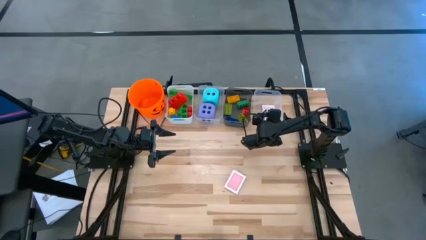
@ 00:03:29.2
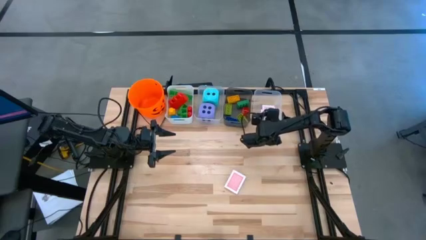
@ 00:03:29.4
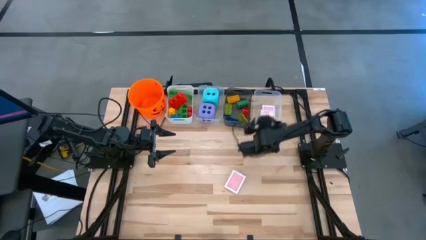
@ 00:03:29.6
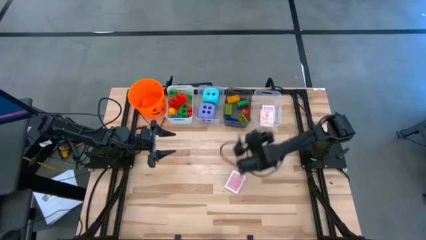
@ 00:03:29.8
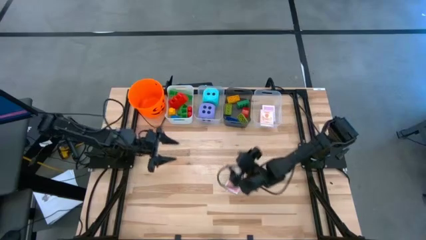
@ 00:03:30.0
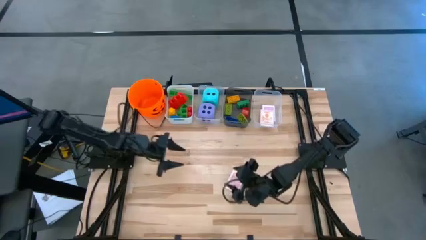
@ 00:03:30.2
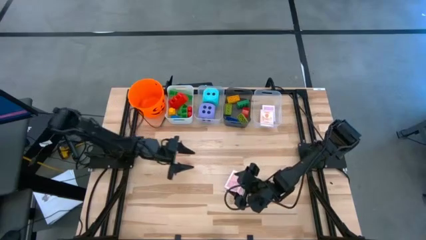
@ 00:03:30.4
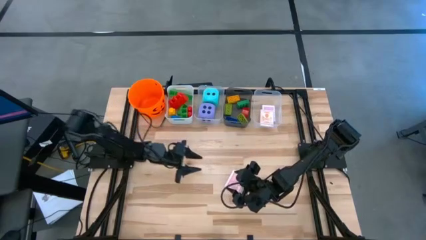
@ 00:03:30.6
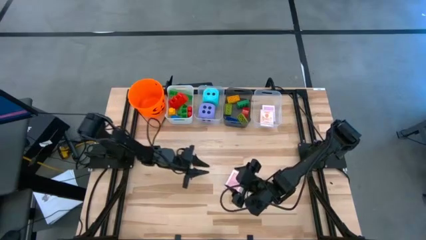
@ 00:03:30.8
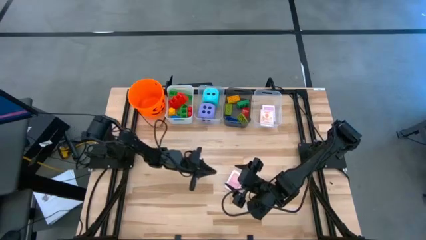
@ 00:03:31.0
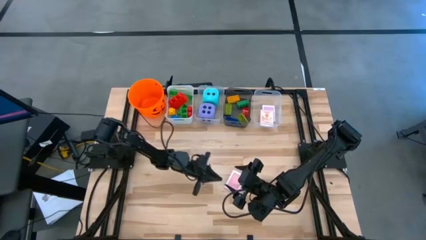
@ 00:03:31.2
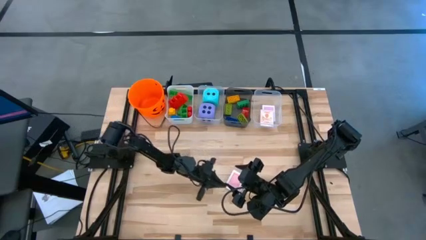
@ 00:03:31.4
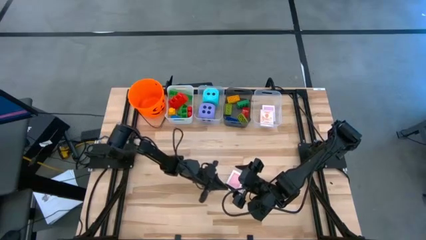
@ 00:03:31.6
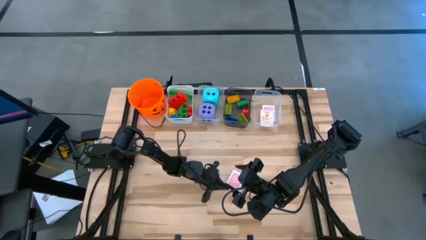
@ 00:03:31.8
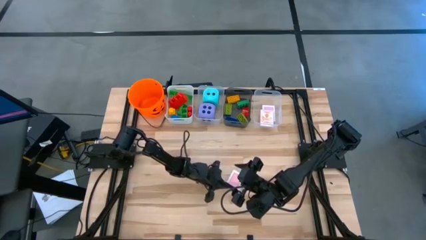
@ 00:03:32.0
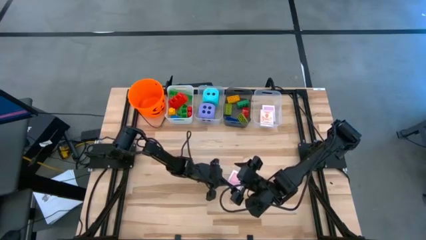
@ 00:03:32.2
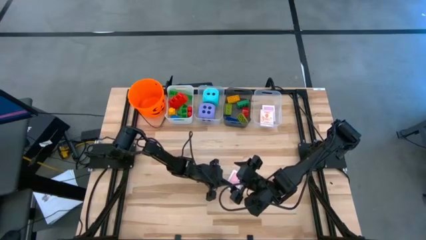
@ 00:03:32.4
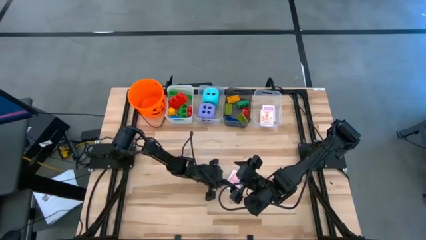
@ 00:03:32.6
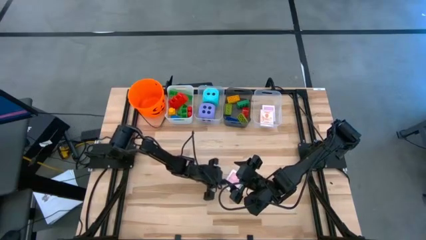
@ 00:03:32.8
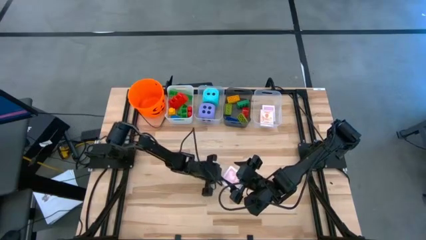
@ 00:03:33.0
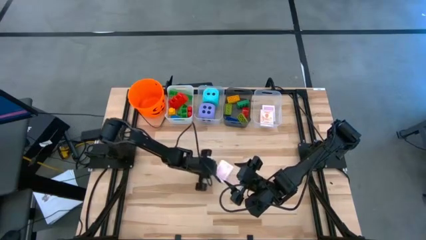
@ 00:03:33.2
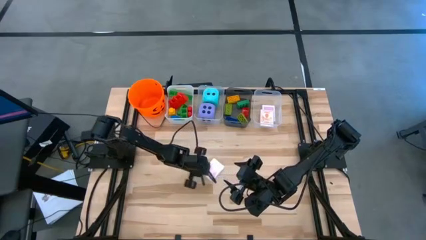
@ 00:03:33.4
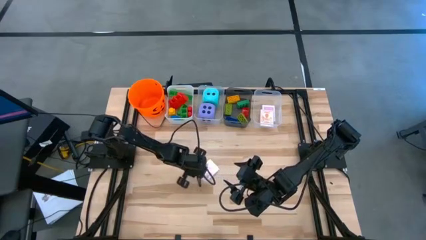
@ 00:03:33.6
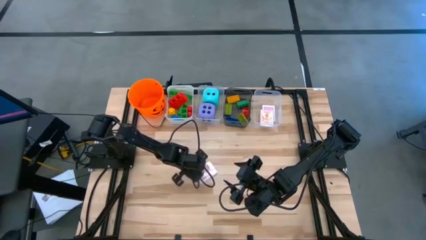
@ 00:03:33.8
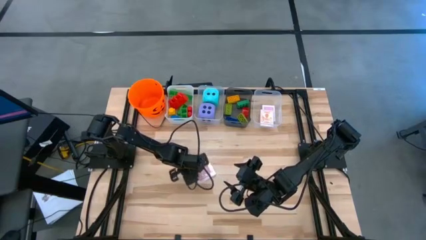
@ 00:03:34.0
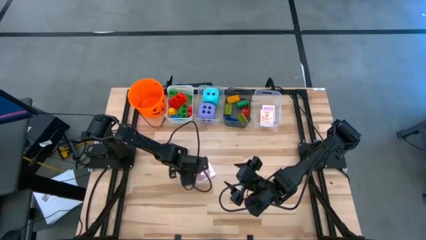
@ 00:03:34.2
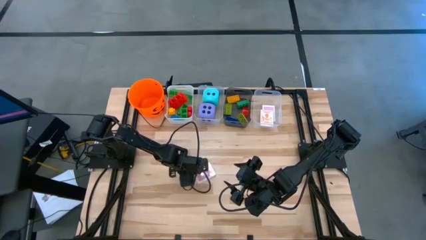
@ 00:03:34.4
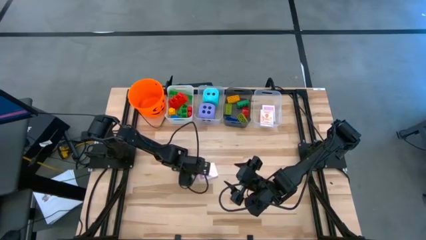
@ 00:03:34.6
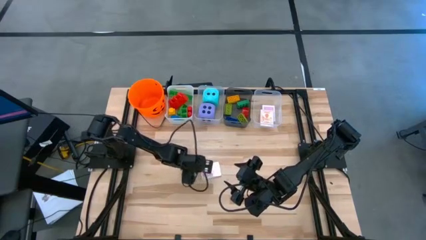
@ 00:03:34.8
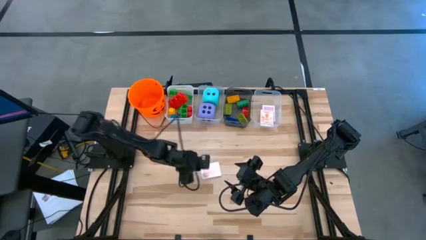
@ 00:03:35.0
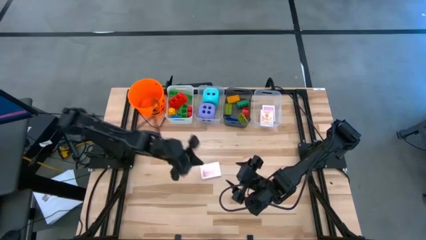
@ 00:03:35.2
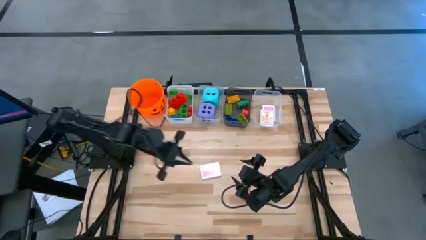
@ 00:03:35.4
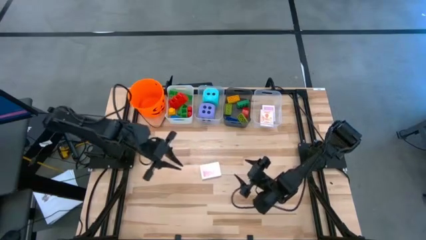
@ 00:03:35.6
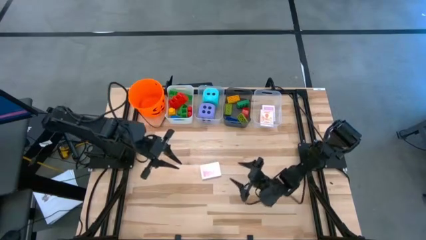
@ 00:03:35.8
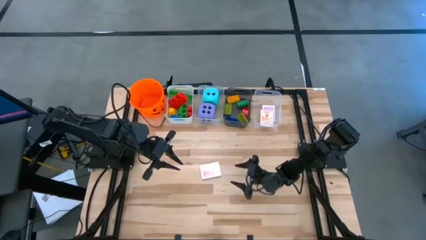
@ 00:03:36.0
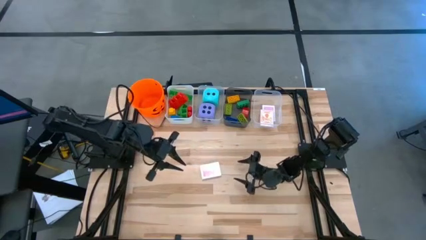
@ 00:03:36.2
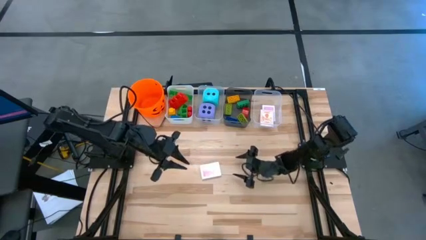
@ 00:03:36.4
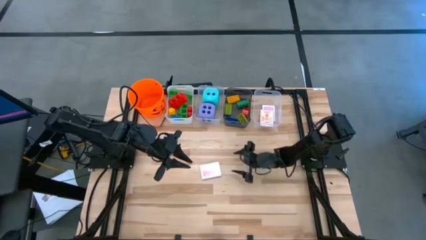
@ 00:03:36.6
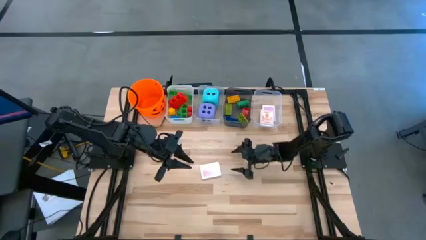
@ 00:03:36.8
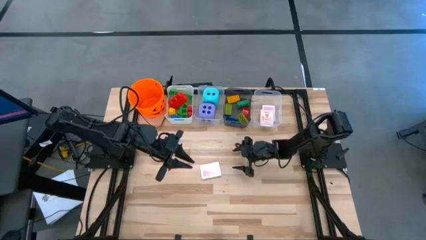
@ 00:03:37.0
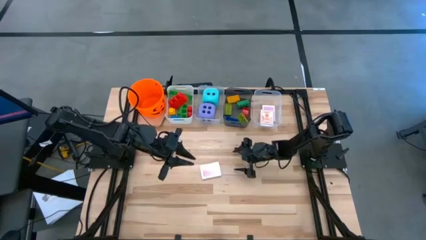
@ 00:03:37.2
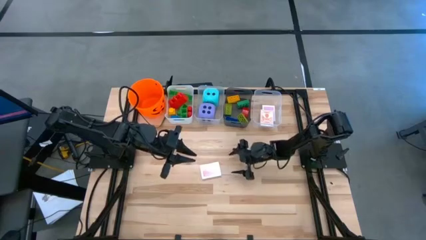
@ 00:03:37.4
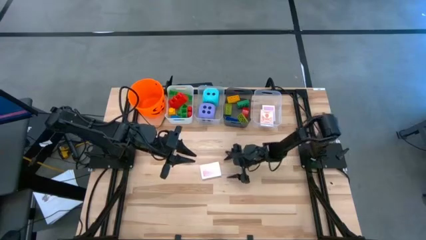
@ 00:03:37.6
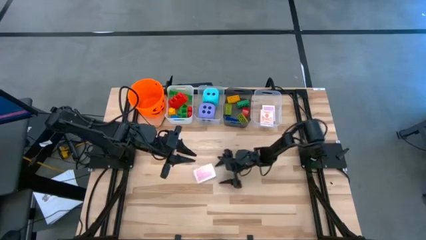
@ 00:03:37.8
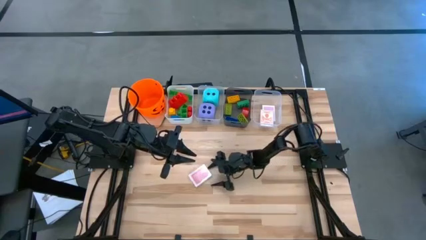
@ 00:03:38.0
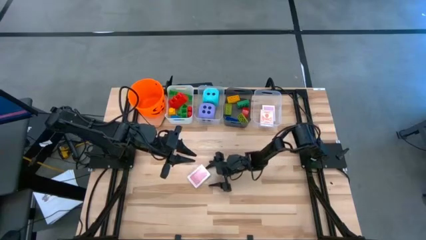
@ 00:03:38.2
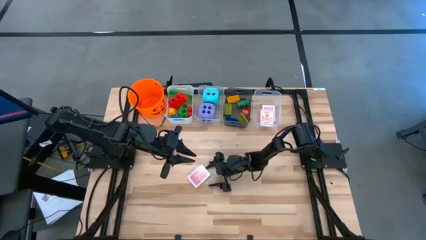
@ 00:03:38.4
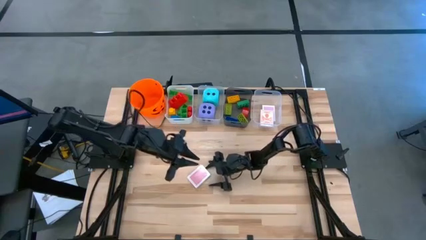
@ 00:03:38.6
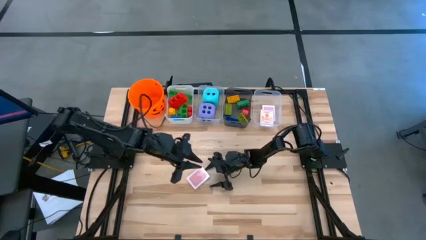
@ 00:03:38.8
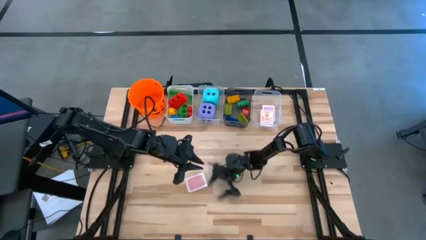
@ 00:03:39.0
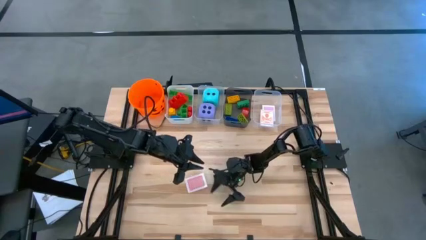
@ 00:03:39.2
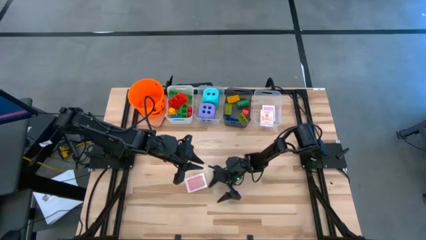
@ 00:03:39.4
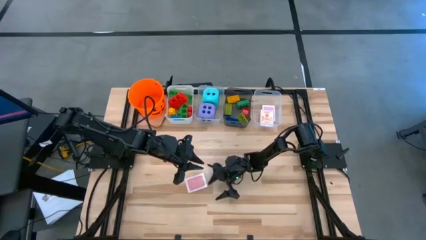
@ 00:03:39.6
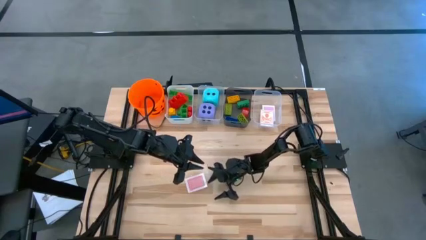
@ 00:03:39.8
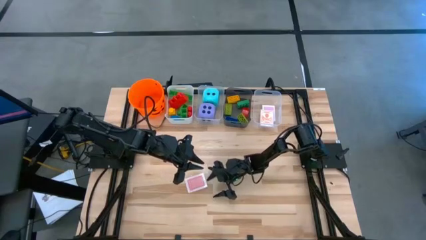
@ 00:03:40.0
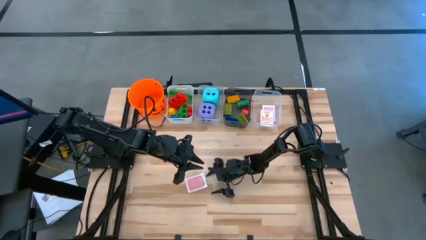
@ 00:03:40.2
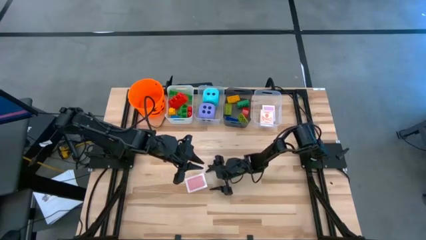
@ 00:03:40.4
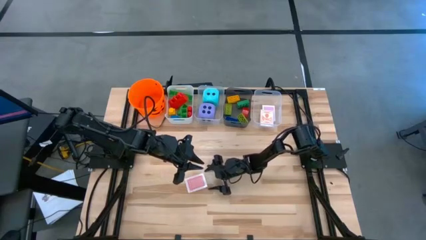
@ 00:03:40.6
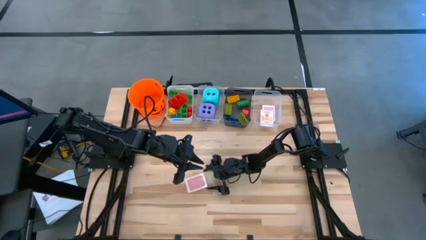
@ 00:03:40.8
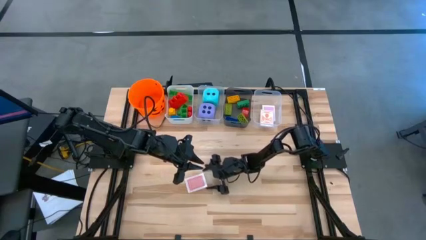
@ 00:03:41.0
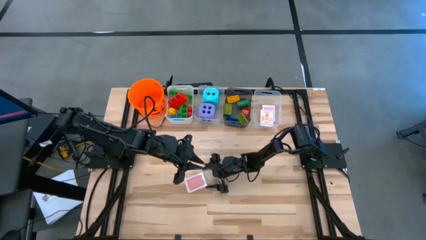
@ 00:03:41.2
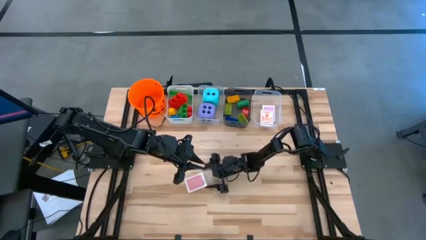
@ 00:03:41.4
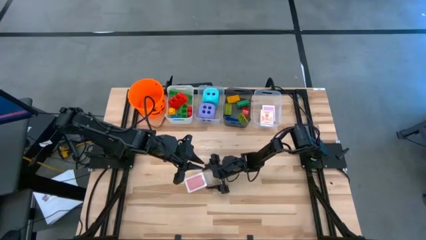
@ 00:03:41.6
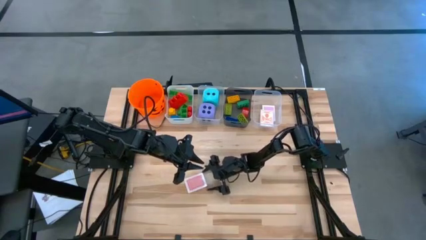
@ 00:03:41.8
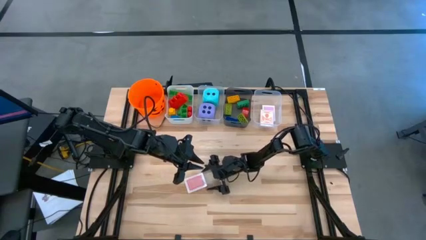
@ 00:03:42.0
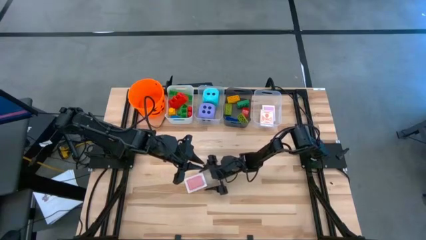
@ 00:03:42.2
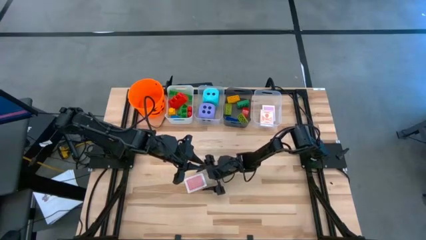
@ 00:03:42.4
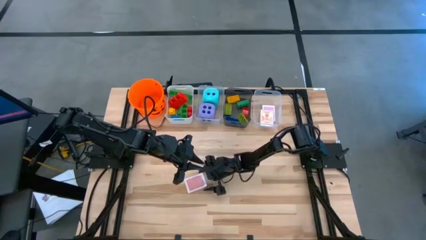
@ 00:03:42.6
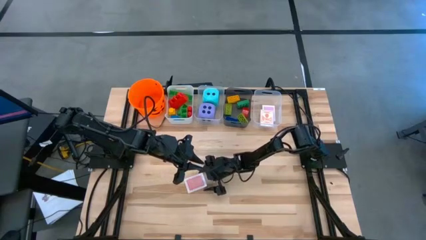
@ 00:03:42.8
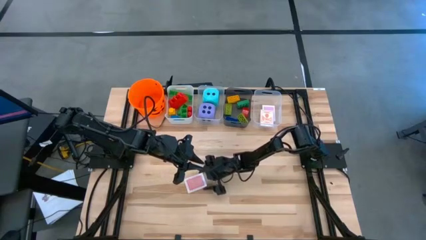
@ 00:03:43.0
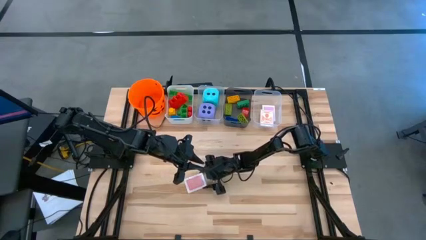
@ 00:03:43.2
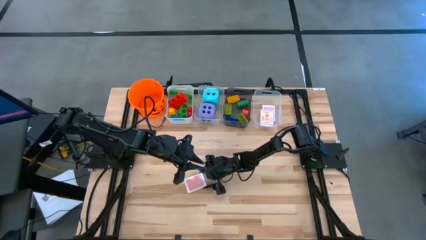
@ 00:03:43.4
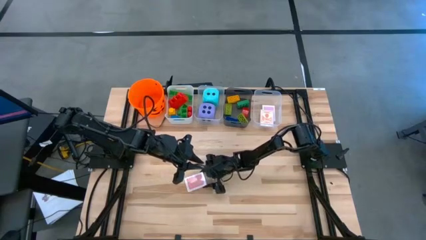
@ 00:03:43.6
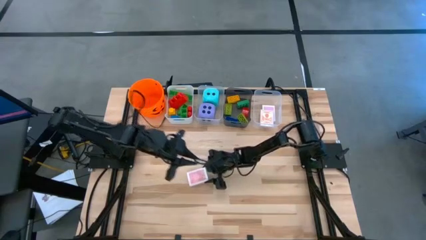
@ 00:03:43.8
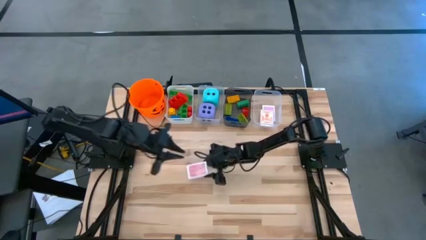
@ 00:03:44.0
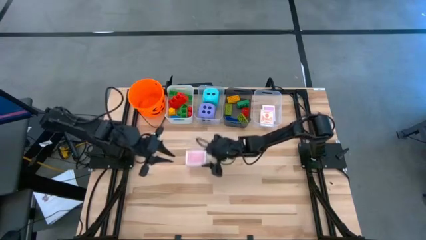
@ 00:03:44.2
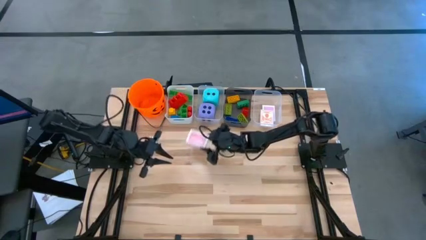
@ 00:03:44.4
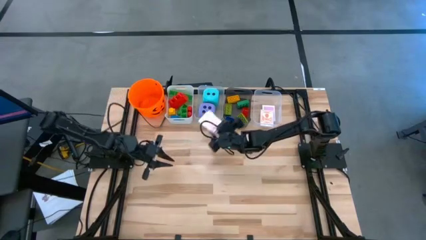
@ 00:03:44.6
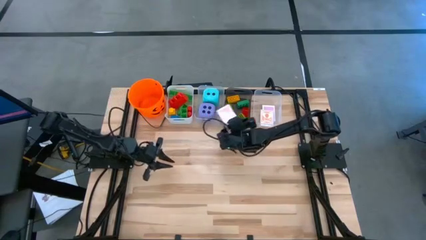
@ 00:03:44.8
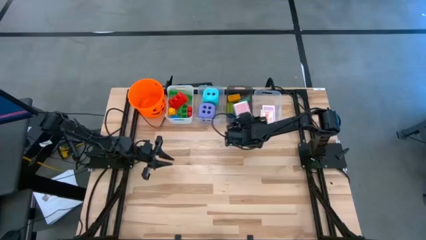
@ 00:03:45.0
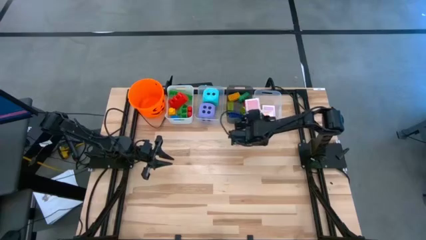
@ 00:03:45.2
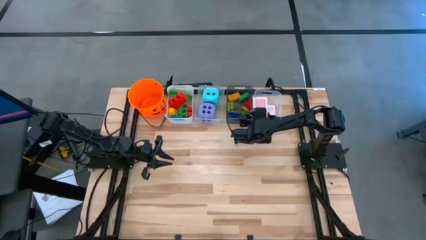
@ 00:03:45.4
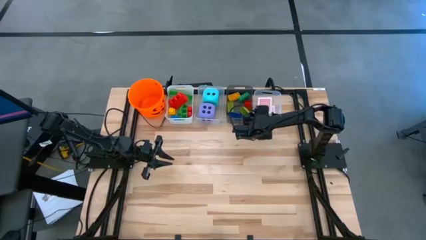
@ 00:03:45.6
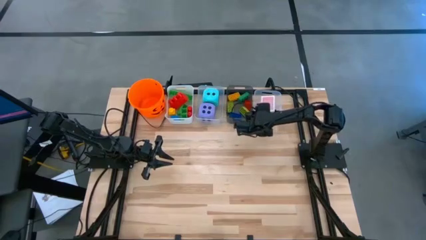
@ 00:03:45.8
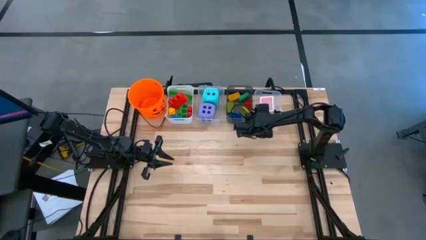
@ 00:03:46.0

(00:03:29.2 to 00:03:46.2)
Task: Pick & Place Toys
Put the red deck of cards into the right transparent bin
